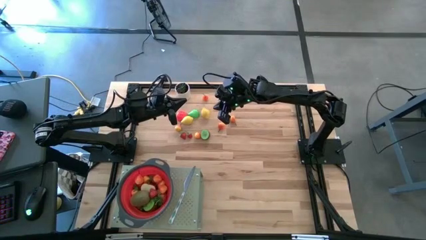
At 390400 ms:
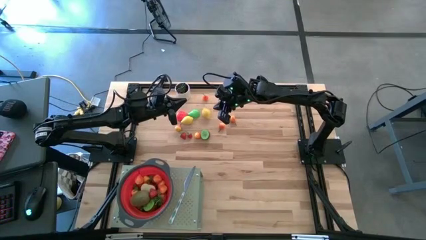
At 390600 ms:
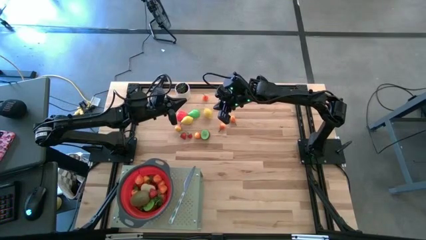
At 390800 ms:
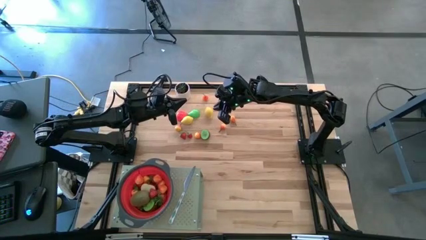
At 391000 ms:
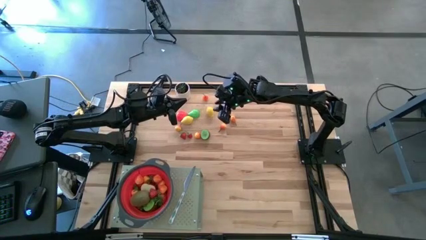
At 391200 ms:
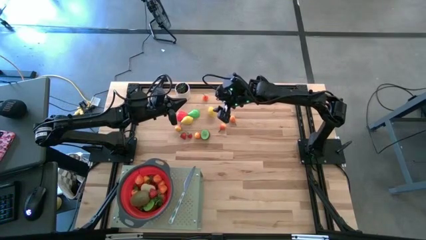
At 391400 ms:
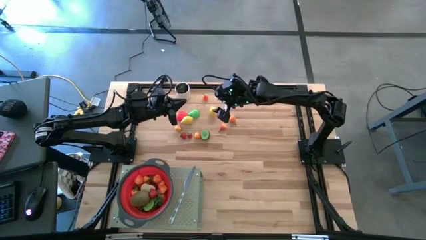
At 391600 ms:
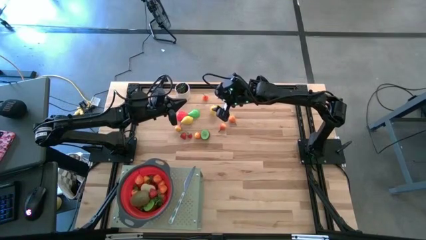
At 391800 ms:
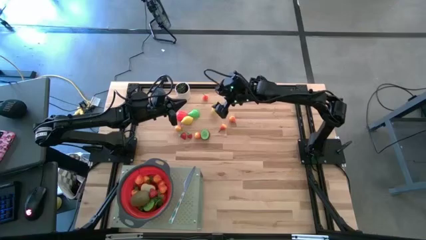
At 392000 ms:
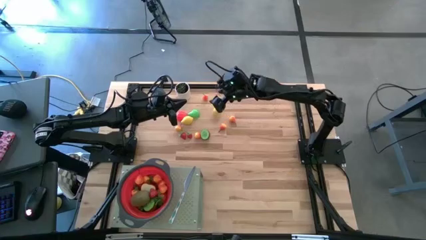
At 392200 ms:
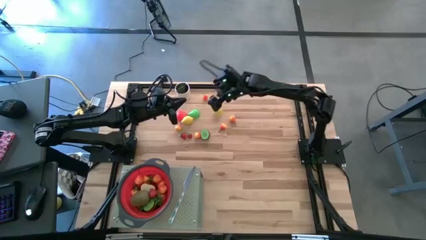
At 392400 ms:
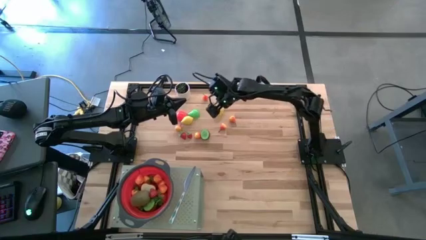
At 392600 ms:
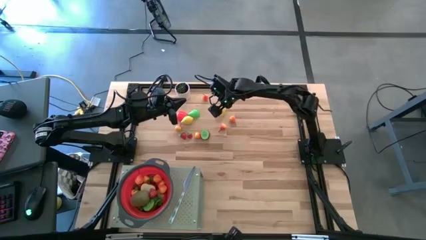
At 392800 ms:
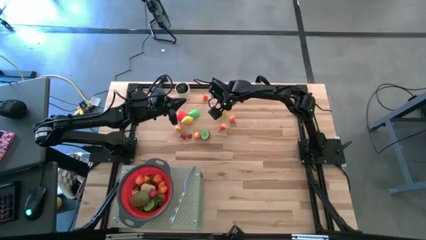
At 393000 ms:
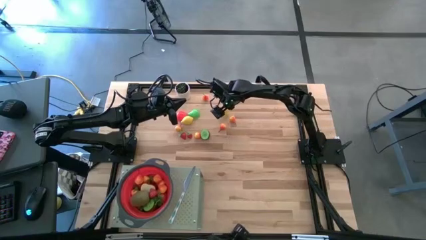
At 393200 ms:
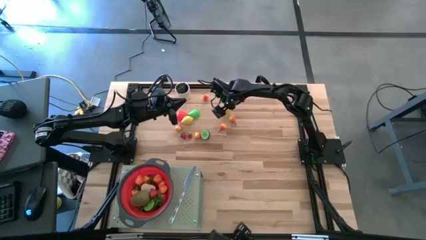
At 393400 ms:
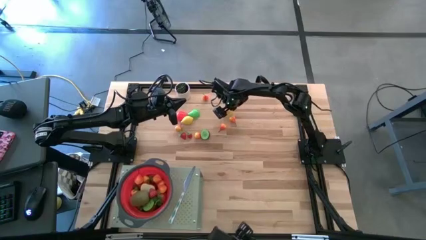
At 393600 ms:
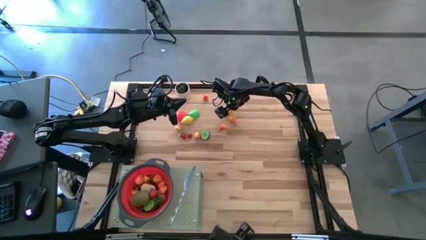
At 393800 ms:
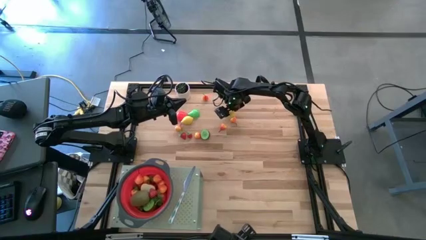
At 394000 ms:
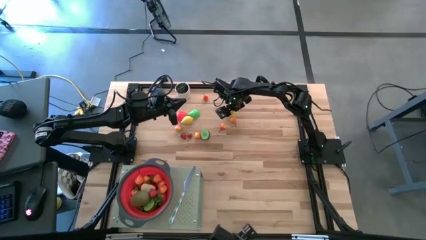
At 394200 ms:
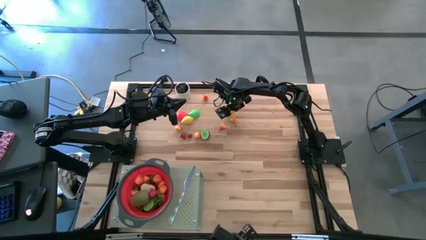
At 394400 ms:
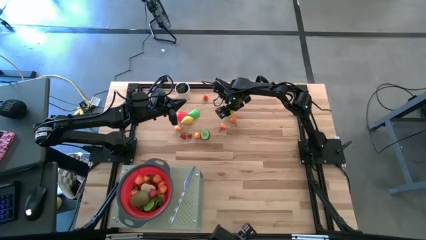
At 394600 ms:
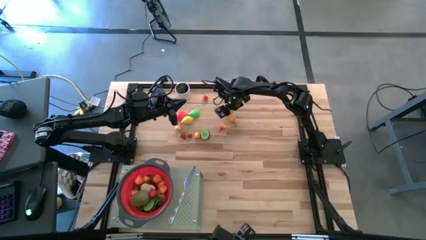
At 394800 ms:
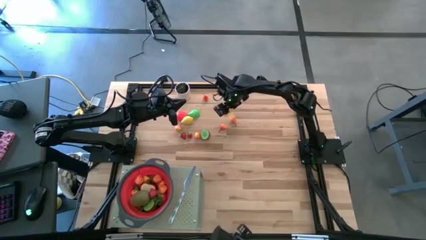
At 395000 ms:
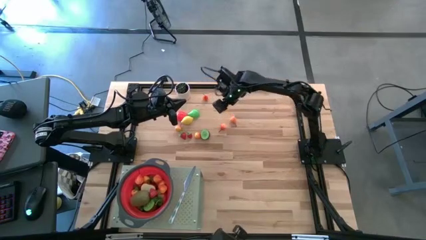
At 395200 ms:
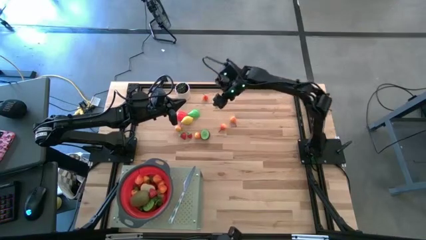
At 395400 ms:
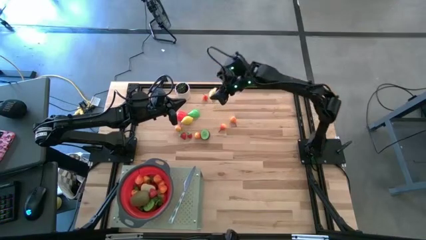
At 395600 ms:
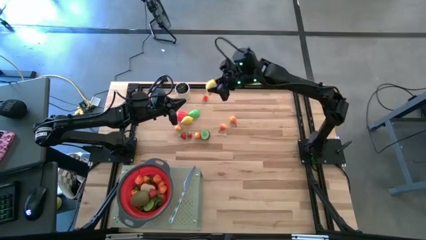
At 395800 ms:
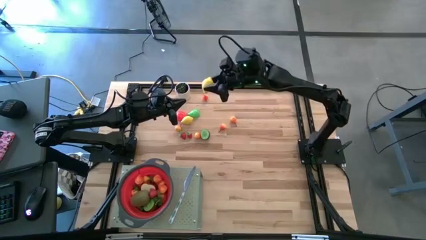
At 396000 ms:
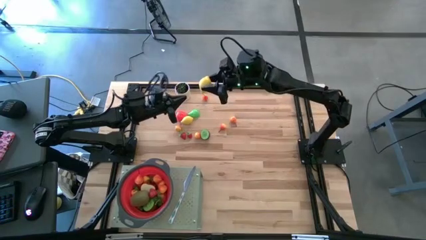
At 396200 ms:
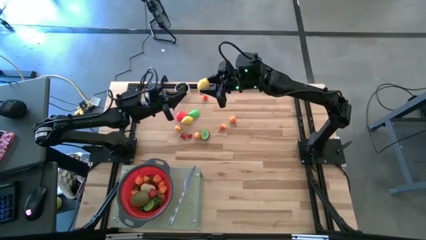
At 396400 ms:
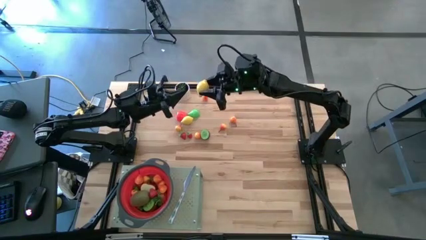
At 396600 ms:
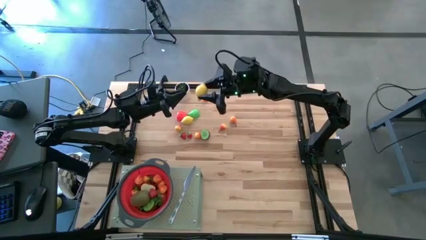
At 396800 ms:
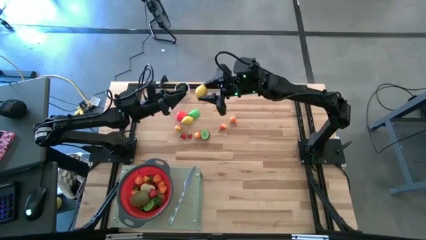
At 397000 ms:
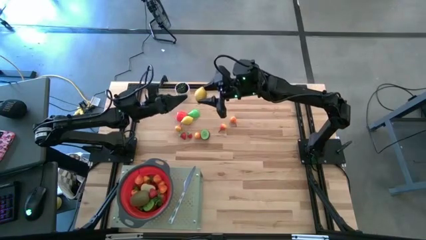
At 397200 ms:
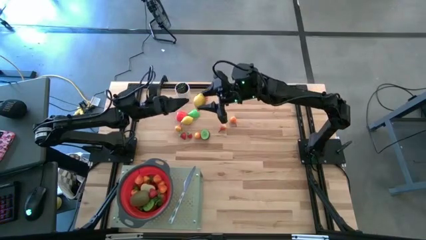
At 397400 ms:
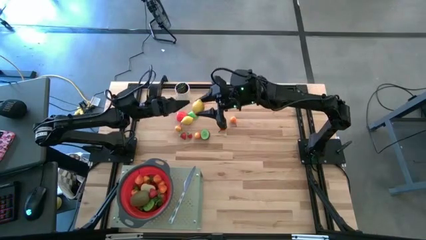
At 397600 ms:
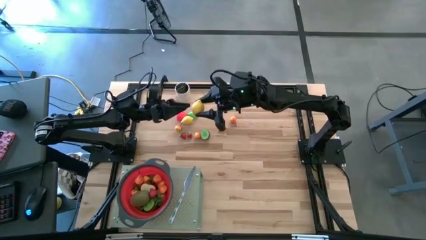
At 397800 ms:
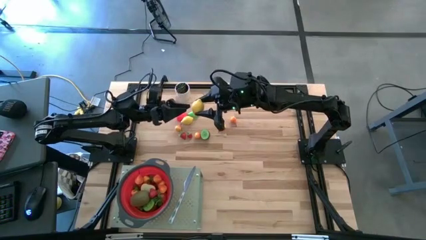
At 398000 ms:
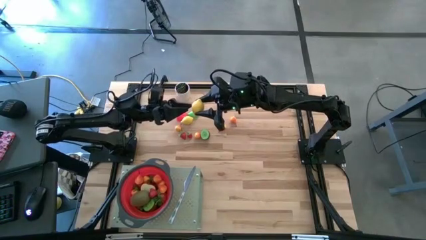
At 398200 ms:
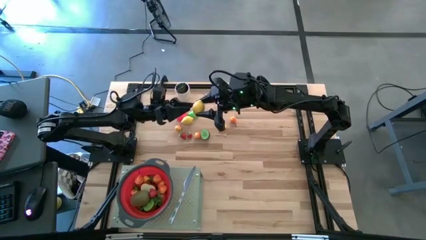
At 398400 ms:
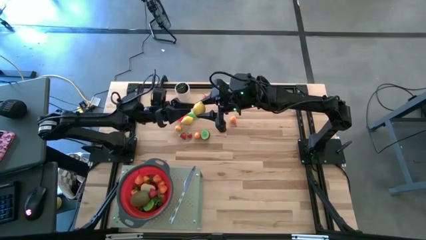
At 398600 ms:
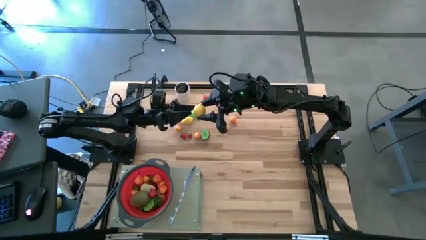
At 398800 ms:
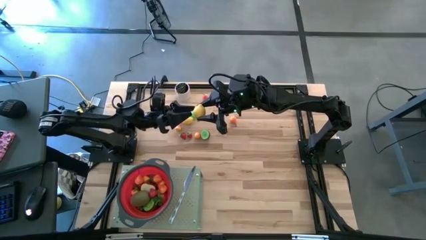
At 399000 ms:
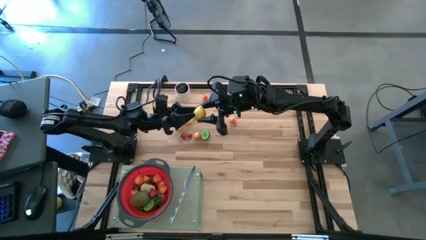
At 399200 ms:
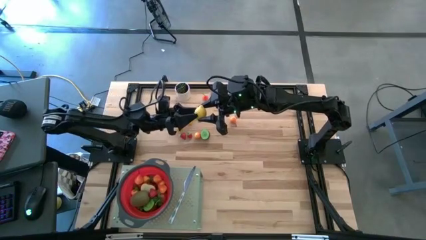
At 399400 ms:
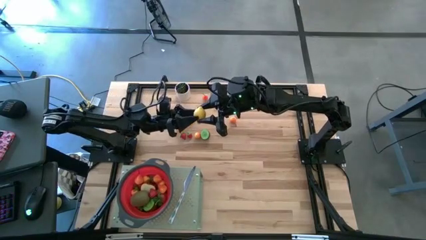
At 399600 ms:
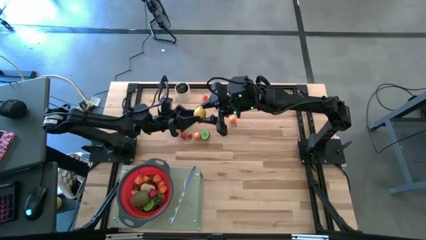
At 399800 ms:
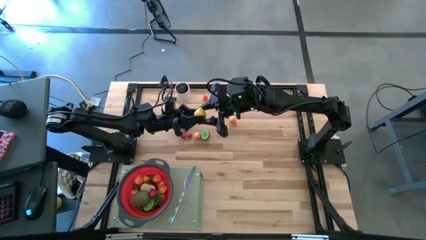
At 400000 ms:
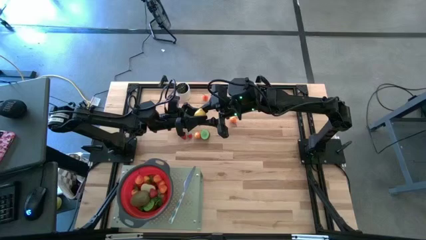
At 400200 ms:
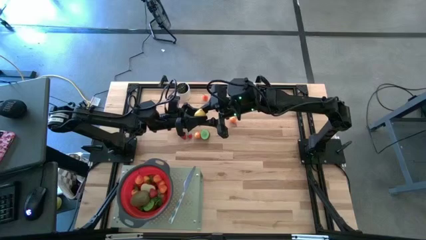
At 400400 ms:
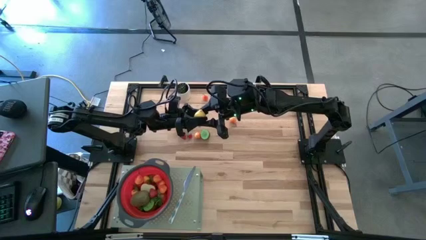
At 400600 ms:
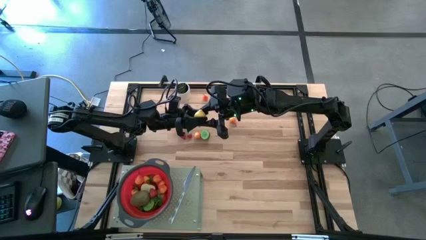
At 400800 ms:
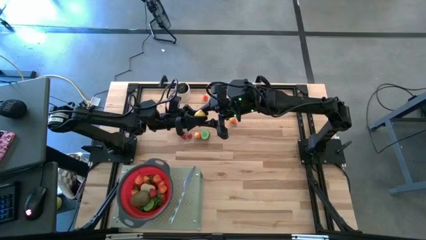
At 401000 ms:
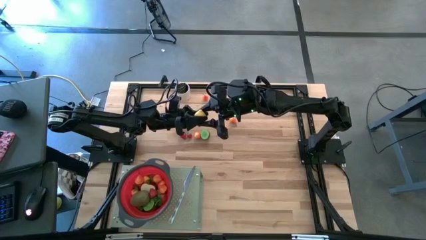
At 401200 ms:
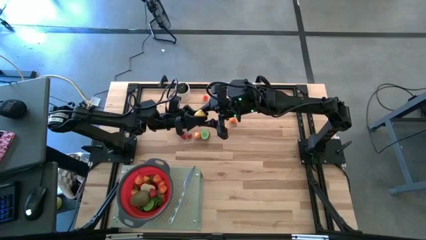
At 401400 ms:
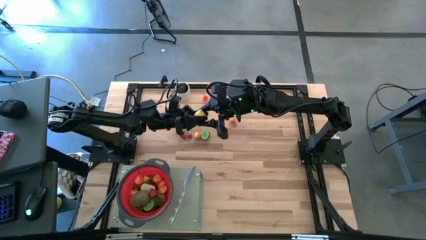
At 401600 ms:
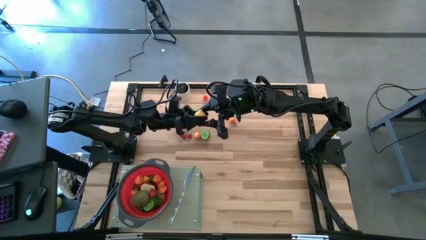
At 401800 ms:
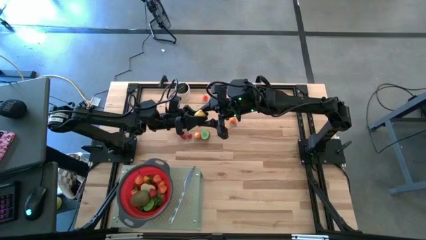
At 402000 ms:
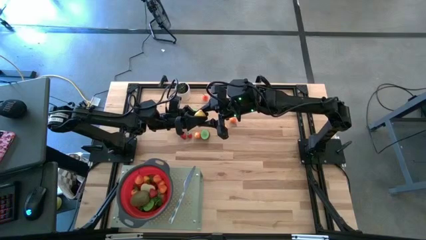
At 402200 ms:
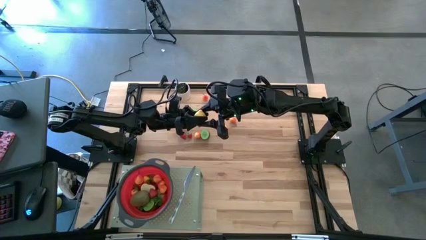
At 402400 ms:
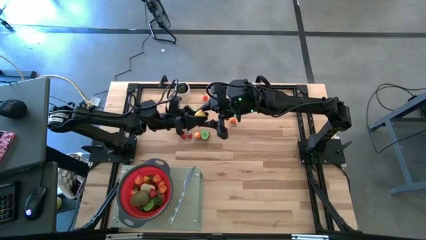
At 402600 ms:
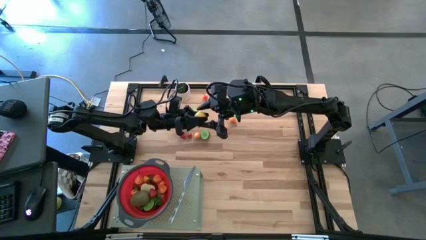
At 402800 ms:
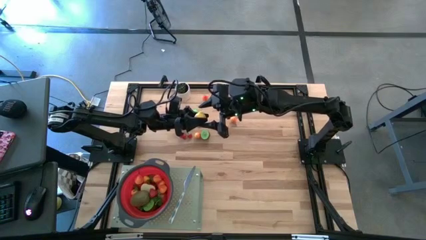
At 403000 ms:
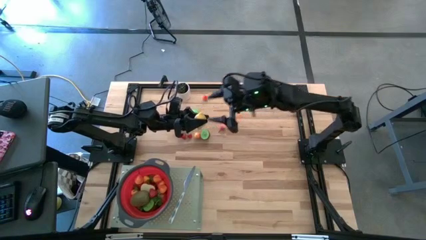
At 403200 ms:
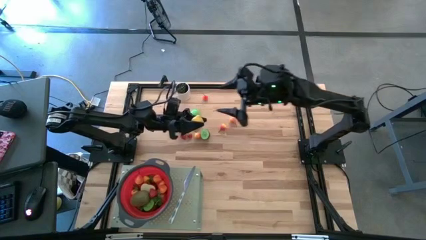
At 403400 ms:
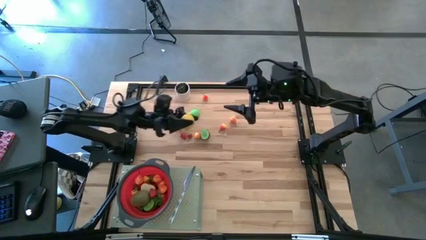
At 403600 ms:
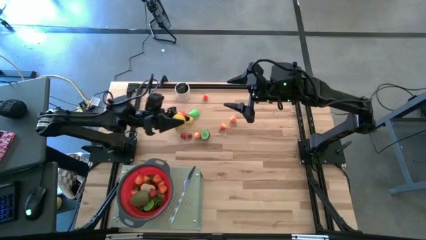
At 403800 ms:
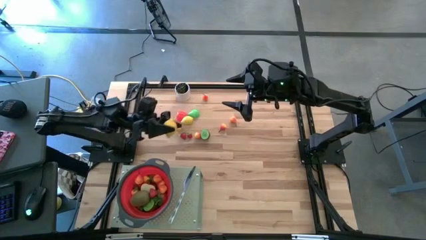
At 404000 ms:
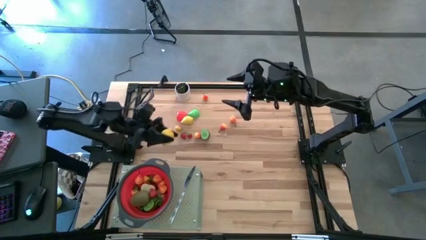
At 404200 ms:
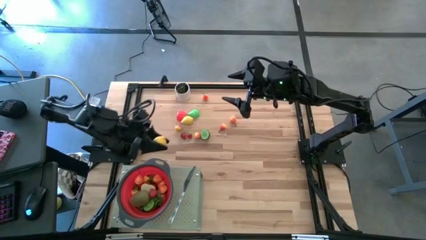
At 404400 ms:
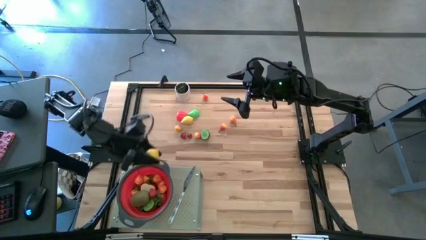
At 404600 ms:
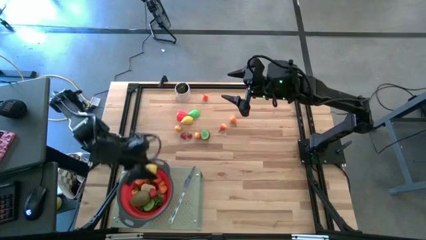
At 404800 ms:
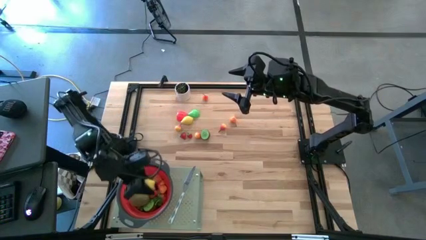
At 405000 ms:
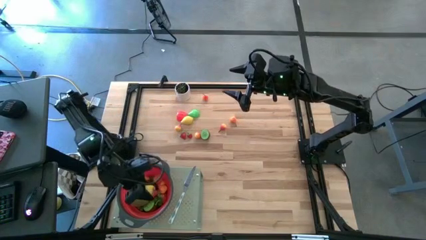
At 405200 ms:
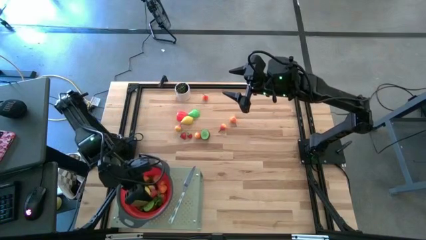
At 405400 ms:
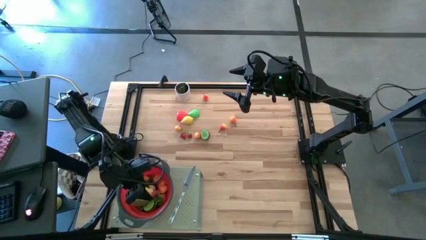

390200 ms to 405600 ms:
Task: Pick & Place Fruit
Put the lemon into the red strainer bowl on the shelf
